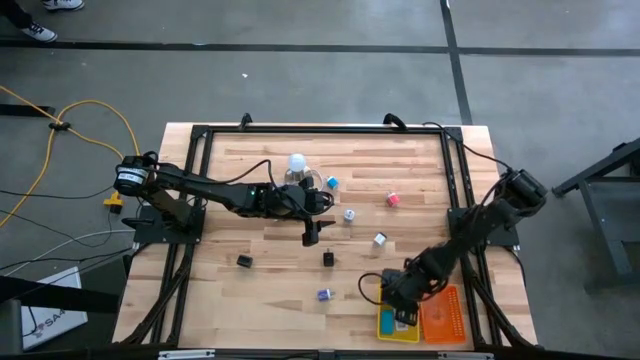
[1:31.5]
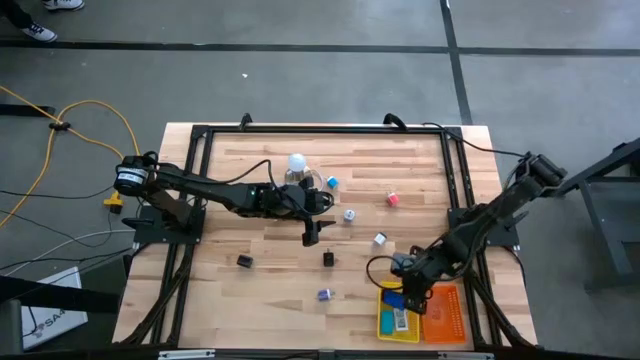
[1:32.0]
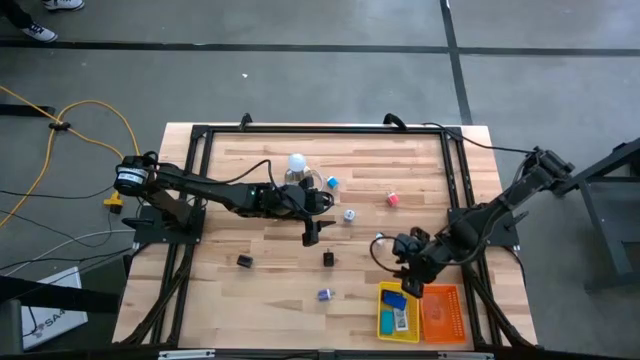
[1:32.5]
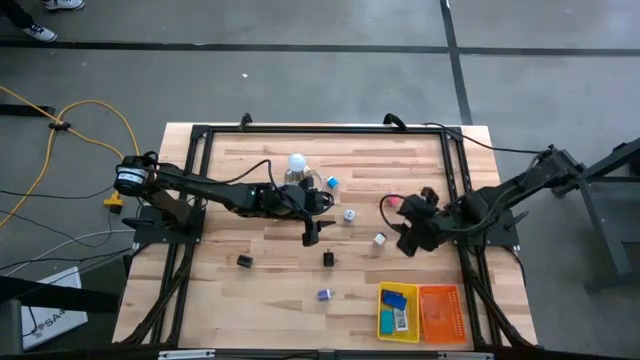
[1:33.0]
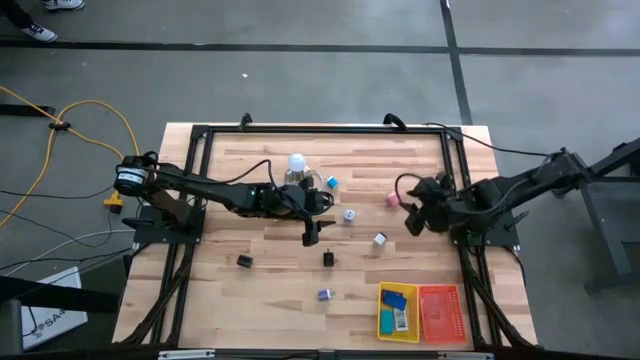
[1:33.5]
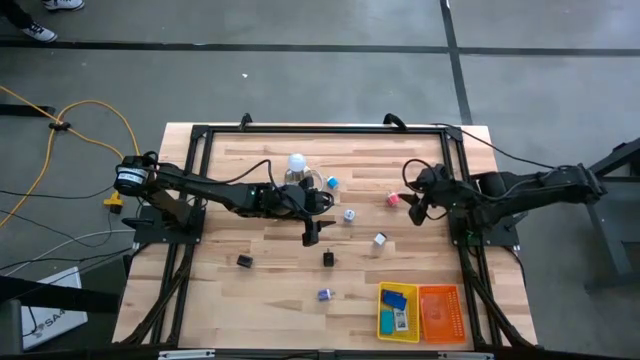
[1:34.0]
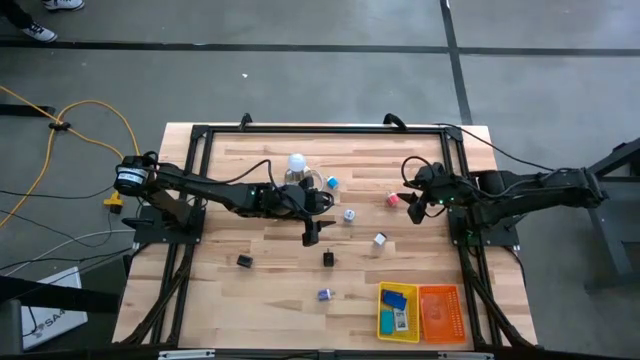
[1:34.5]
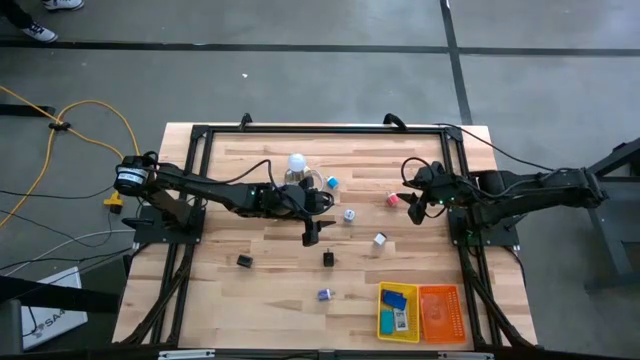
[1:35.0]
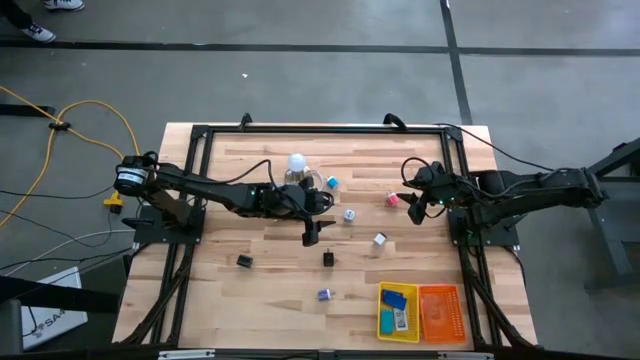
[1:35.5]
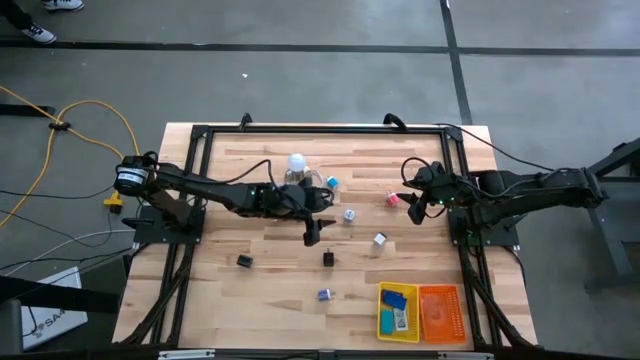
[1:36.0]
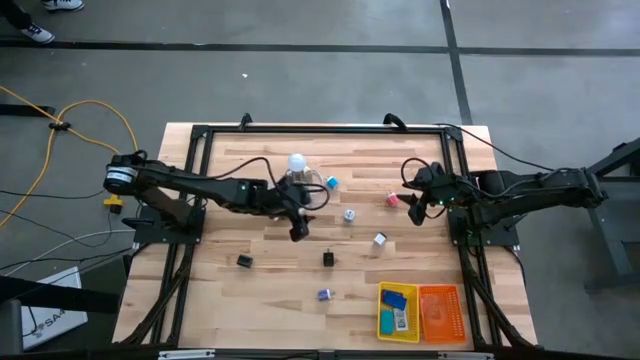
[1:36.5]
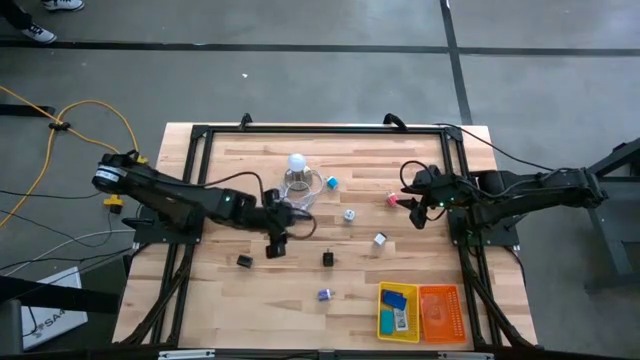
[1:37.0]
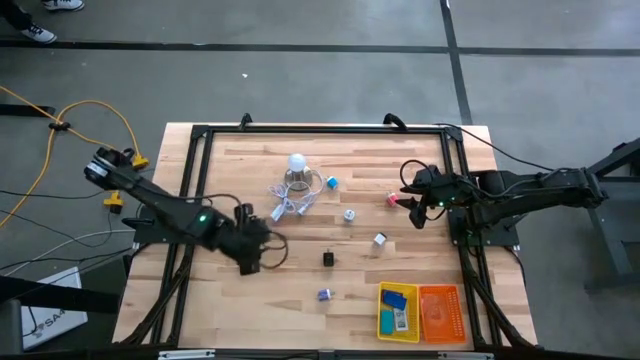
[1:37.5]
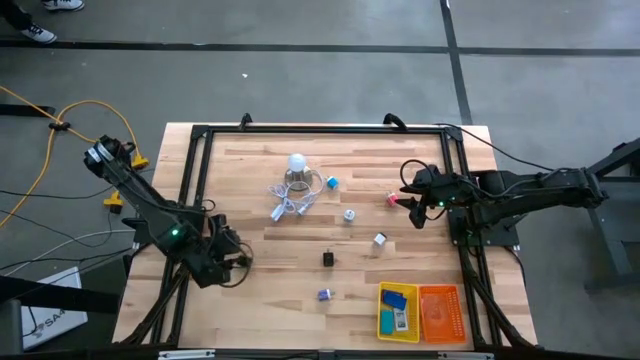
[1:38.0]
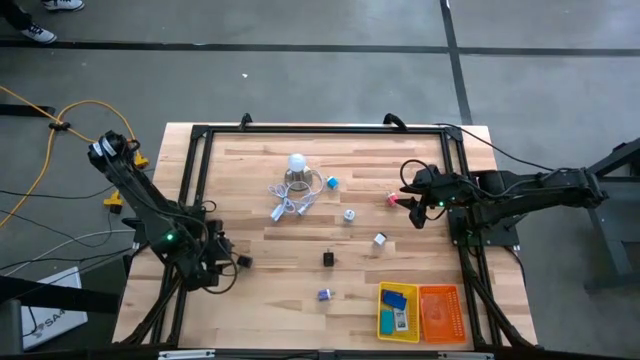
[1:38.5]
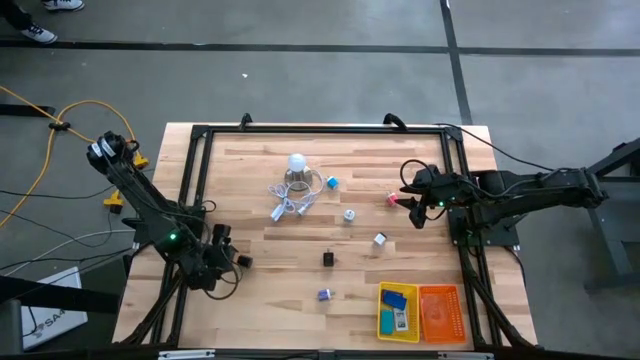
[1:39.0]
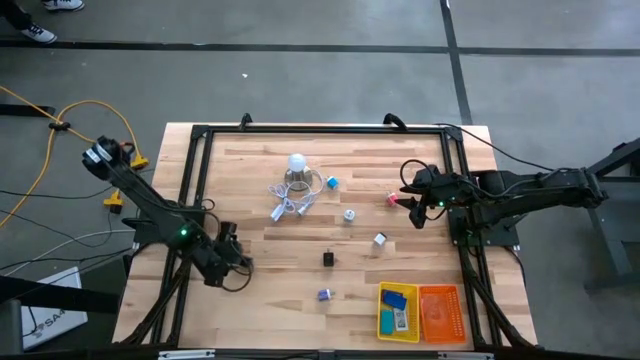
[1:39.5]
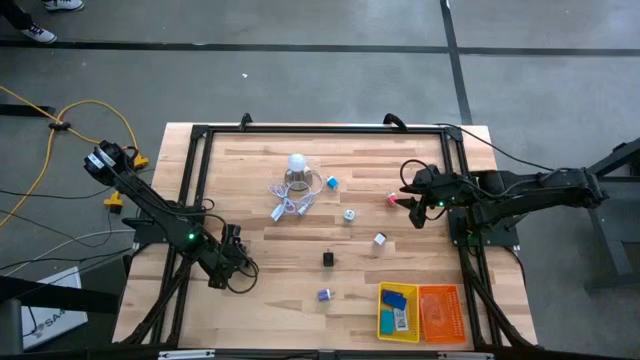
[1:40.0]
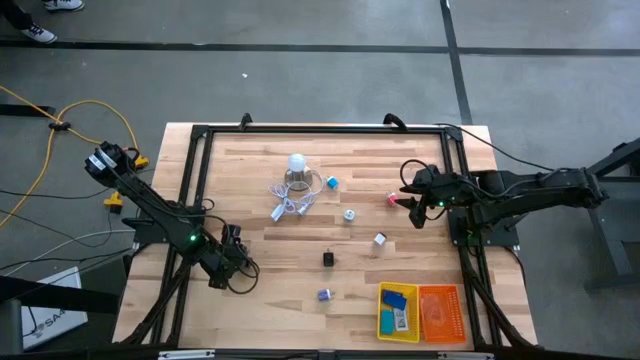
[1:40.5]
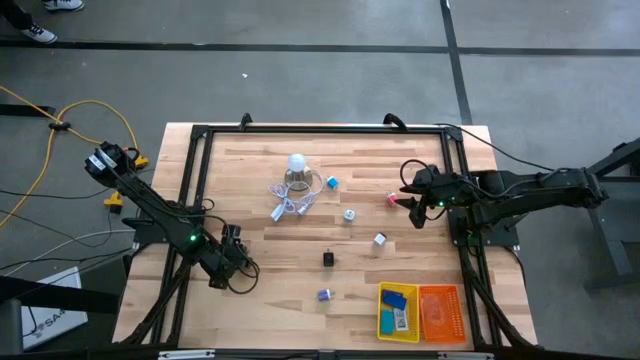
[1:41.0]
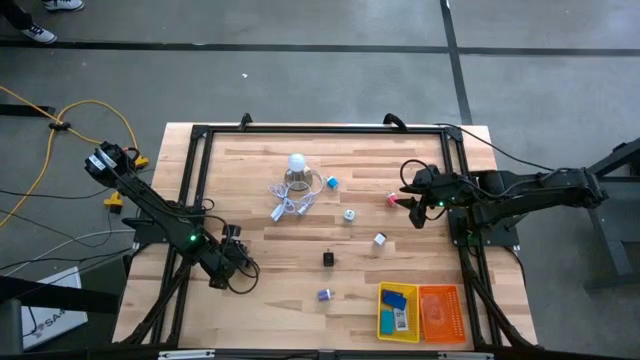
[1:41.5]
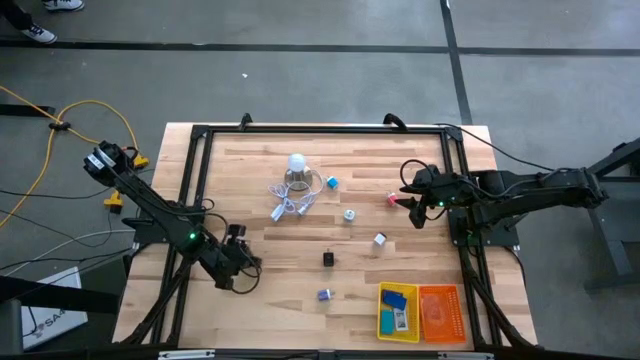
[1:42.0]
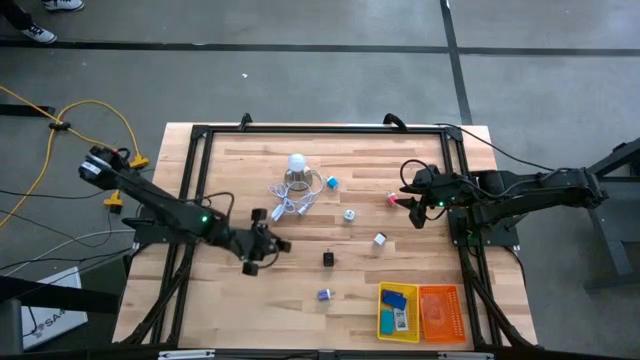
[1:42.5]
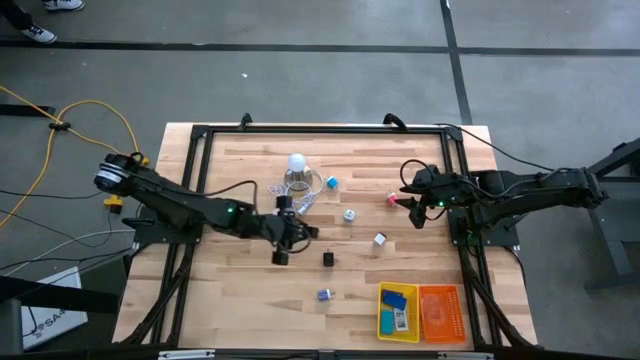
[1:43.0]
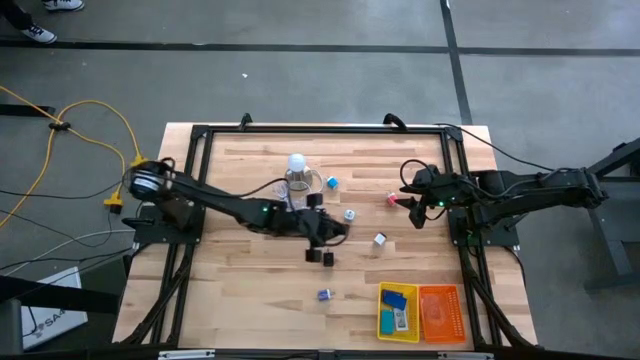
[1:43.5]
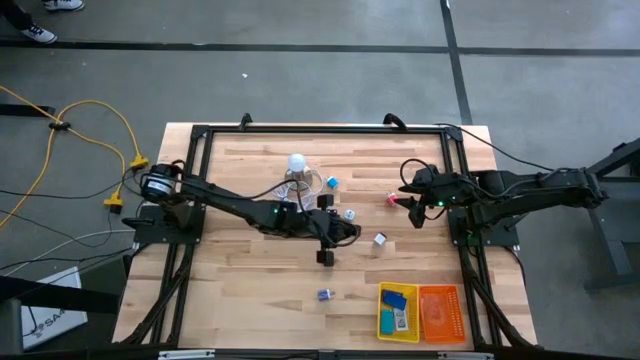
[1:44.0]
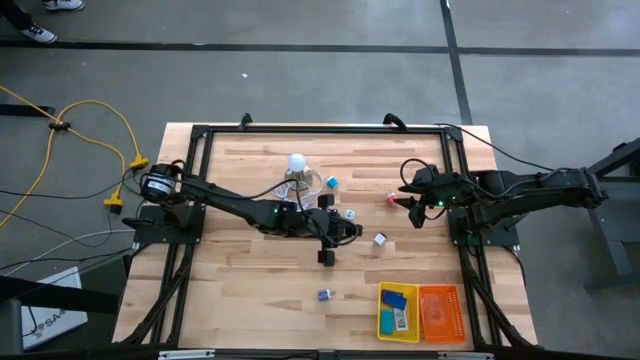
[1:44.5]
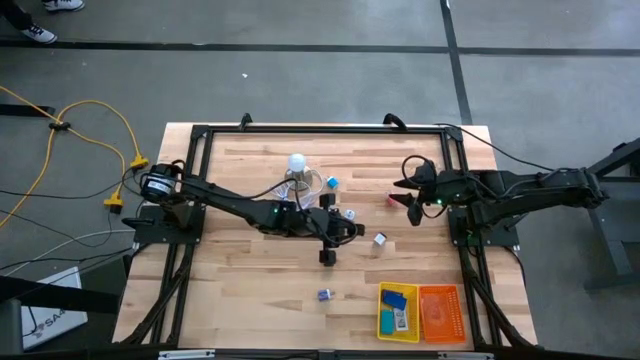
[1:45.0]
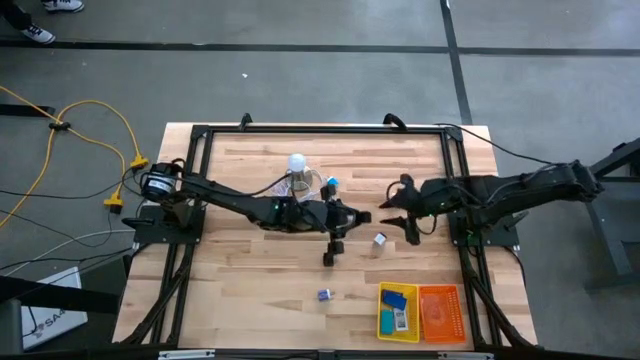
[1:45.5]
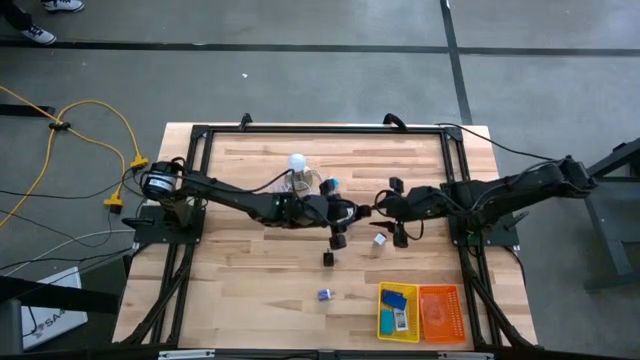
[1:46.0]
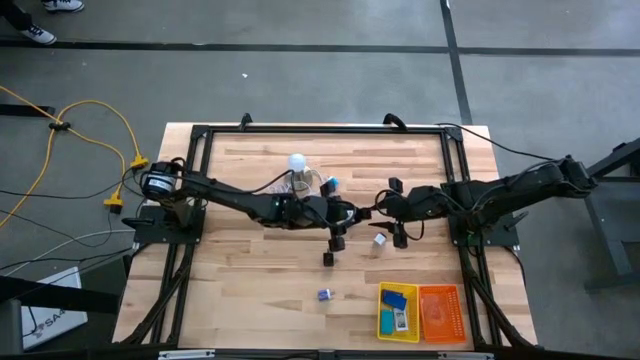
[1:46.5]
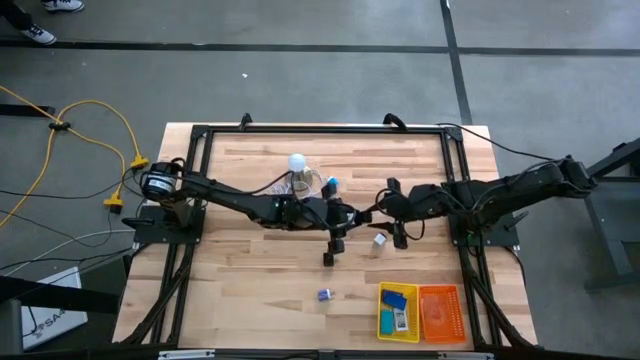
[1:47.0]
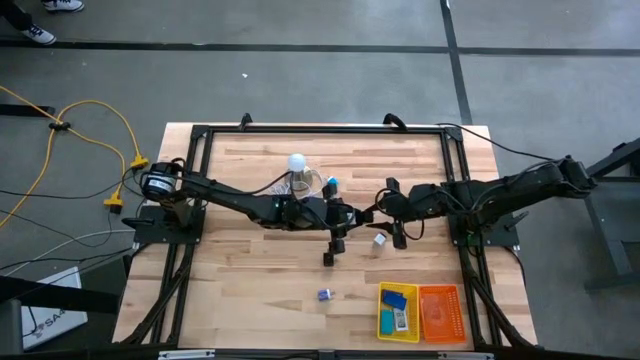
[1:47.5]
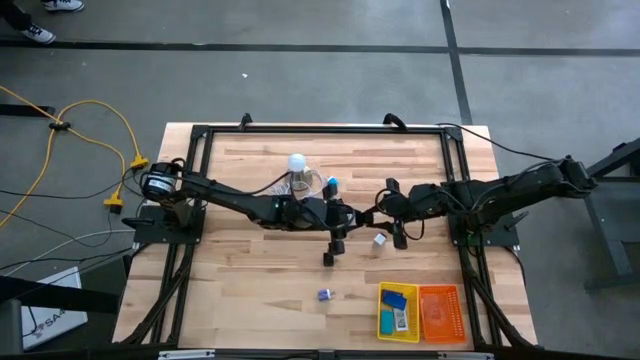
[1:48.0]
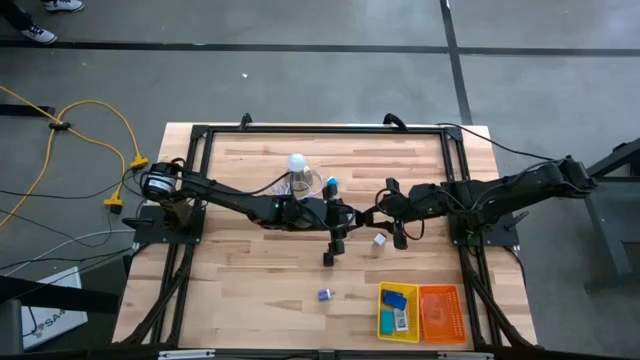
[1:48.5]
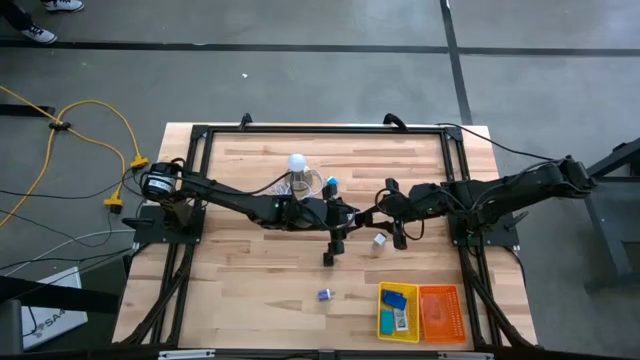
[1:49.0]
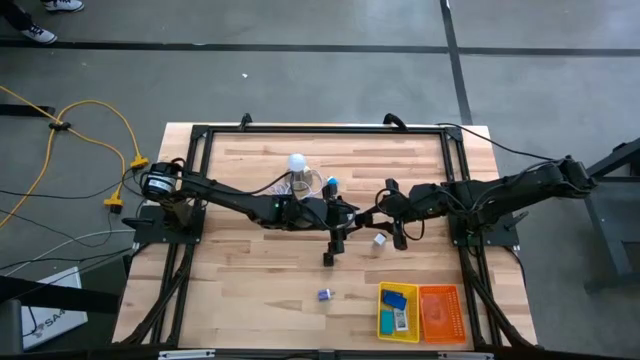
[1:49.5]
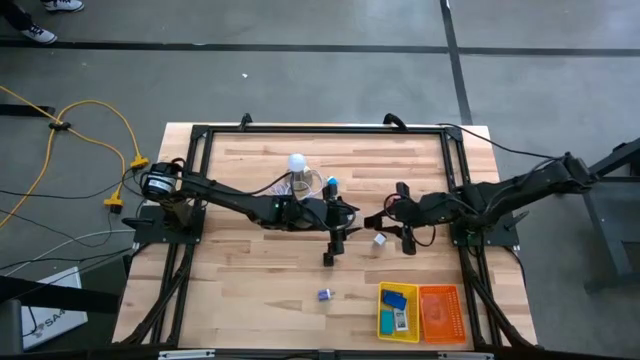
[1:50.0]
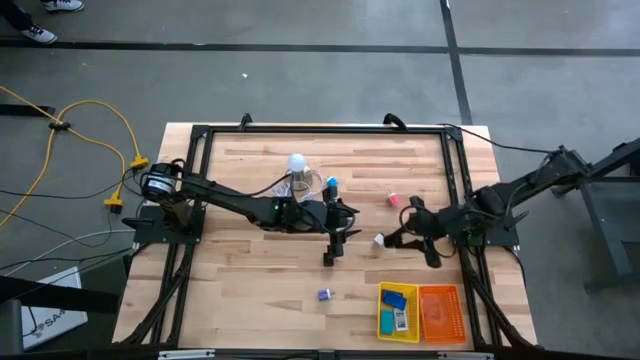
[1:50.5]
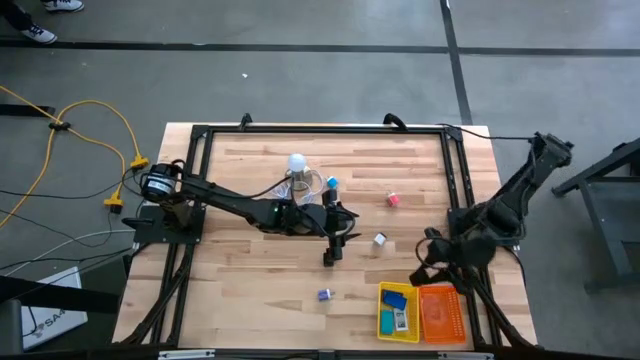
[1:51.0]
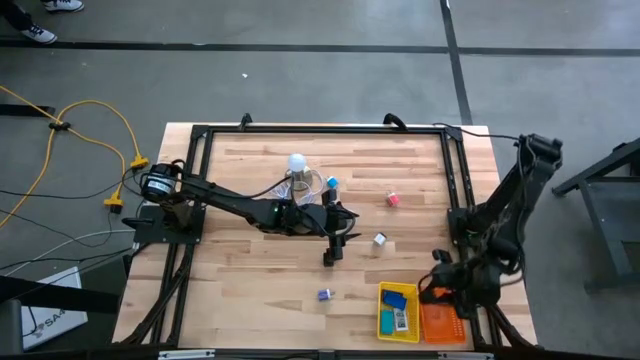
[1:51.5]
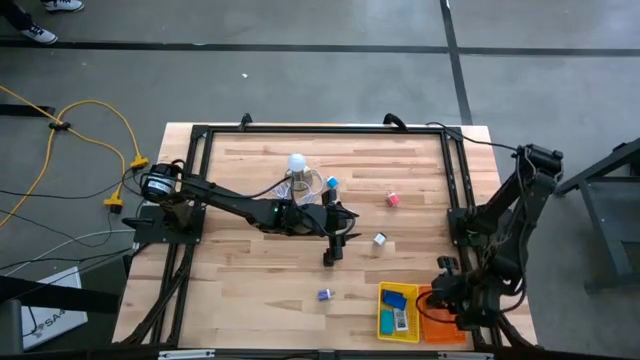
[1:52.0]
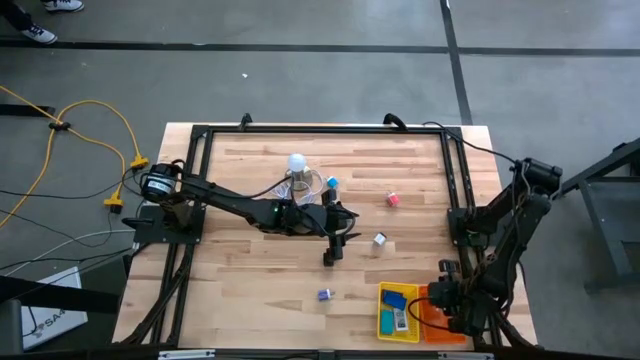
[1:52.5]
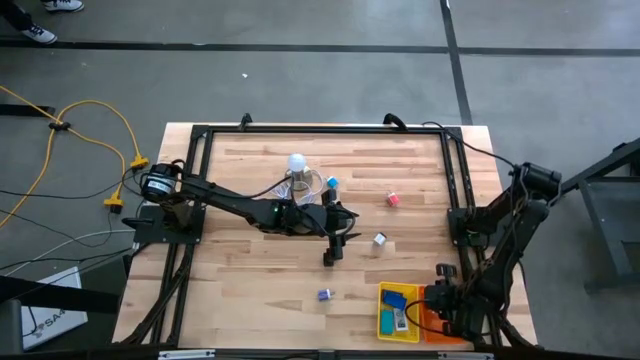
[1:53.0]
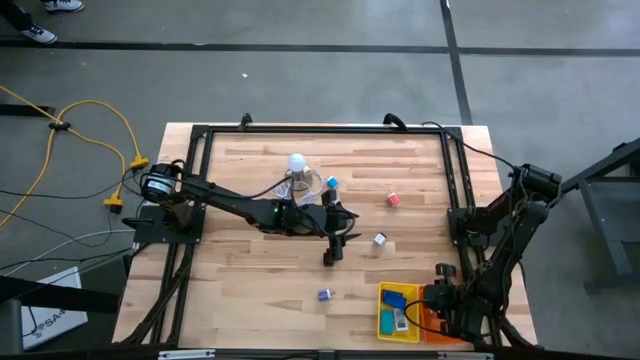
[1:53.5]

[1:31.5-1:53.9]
Task: Pick & Place Office items
Put the left black charger adapter into the orange basket
